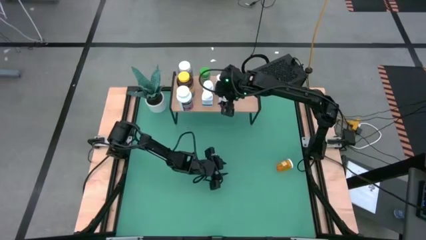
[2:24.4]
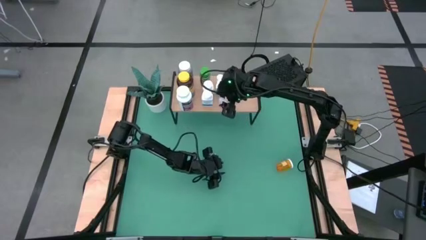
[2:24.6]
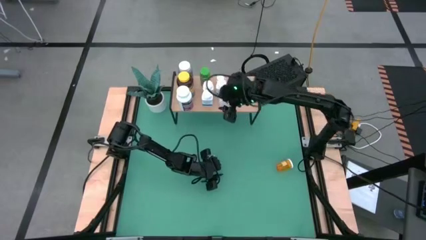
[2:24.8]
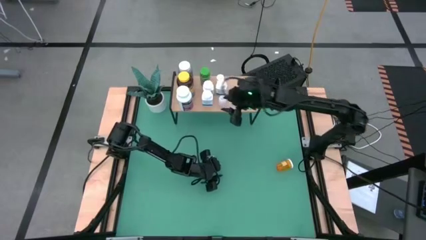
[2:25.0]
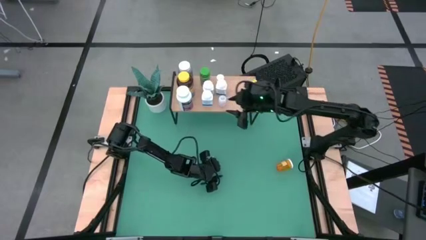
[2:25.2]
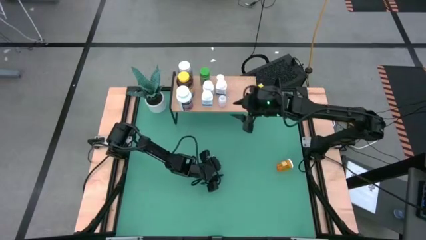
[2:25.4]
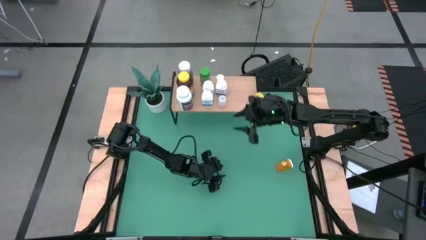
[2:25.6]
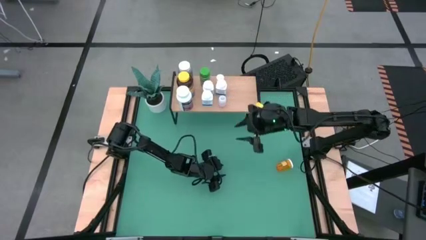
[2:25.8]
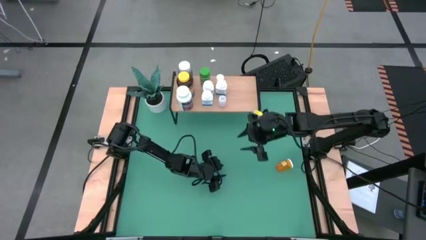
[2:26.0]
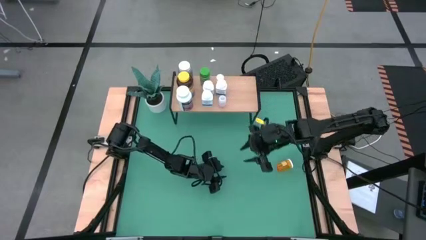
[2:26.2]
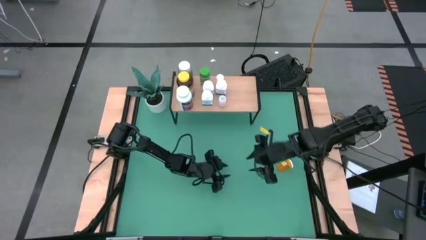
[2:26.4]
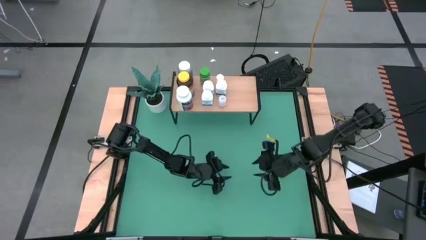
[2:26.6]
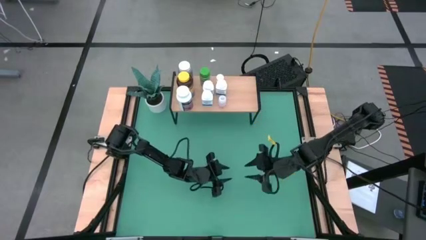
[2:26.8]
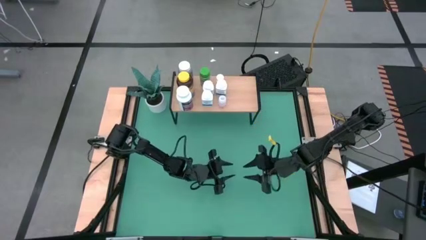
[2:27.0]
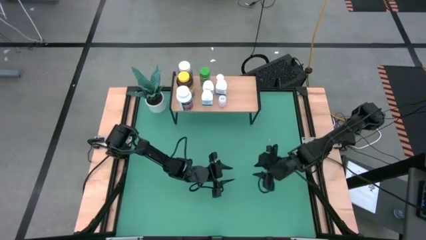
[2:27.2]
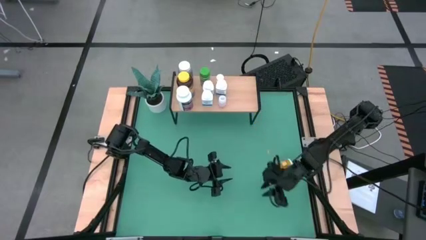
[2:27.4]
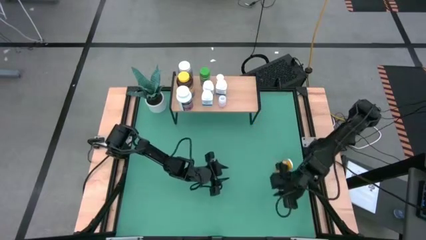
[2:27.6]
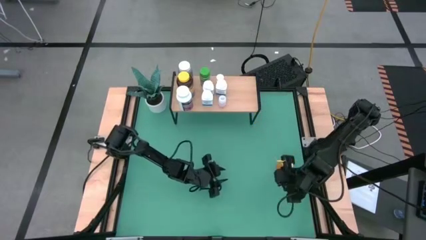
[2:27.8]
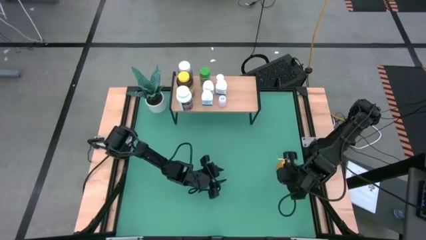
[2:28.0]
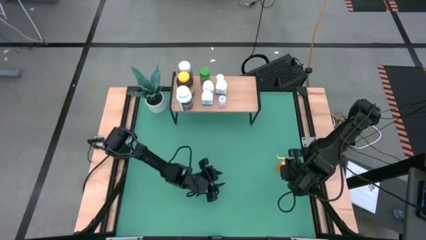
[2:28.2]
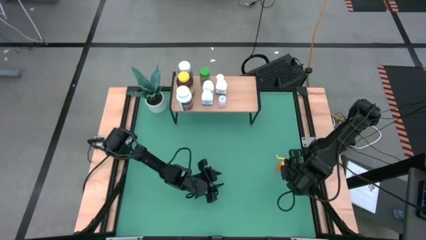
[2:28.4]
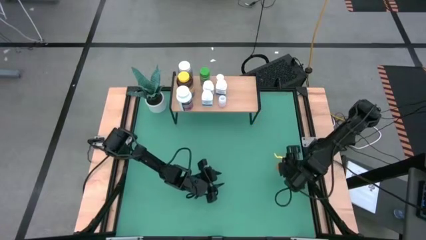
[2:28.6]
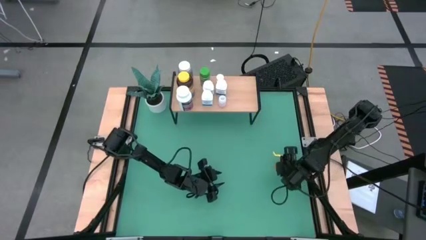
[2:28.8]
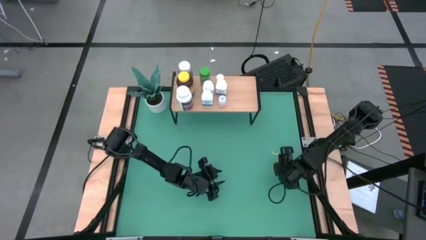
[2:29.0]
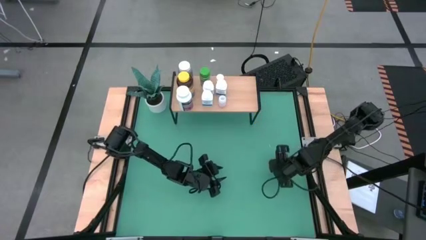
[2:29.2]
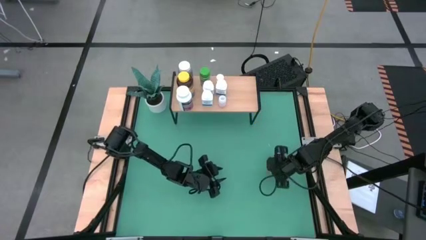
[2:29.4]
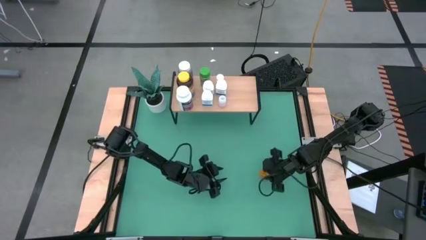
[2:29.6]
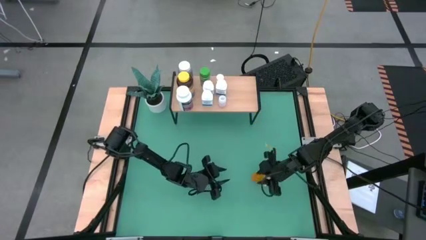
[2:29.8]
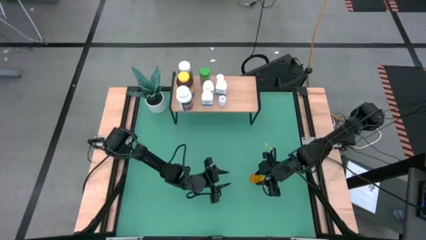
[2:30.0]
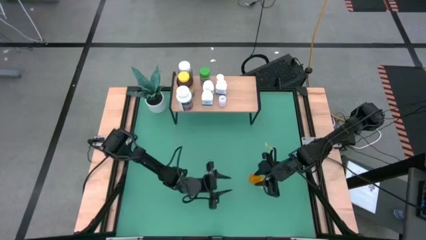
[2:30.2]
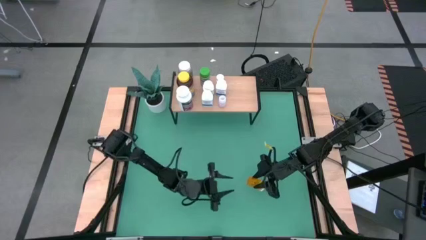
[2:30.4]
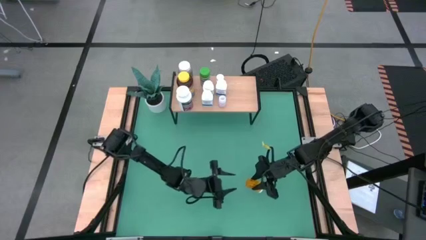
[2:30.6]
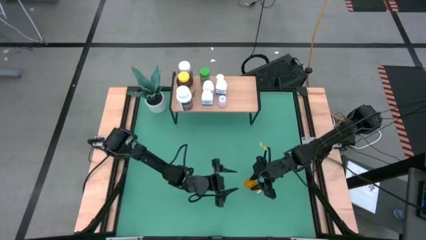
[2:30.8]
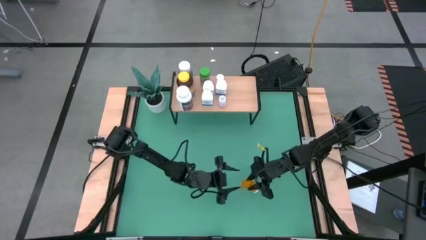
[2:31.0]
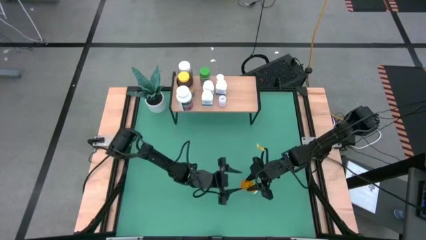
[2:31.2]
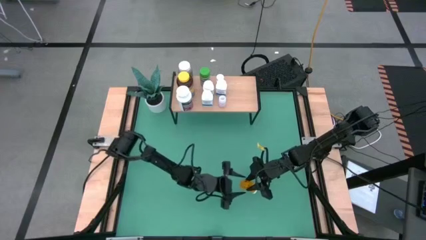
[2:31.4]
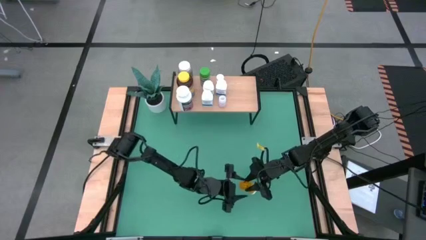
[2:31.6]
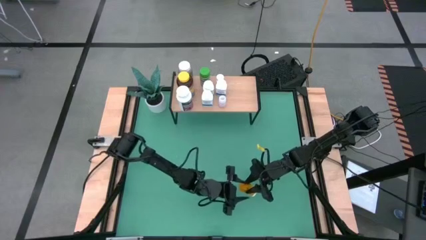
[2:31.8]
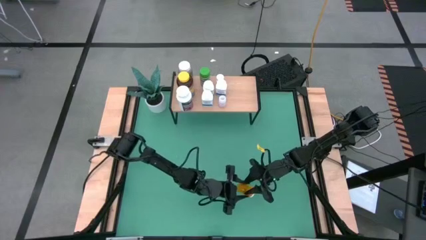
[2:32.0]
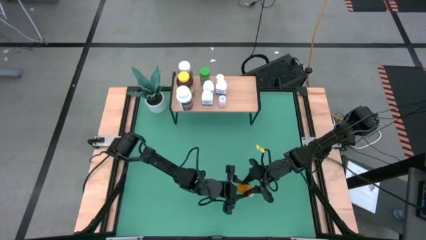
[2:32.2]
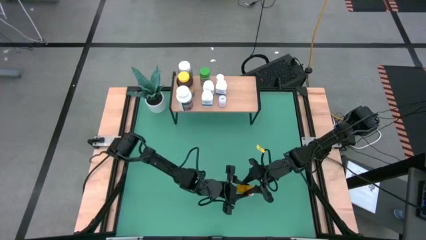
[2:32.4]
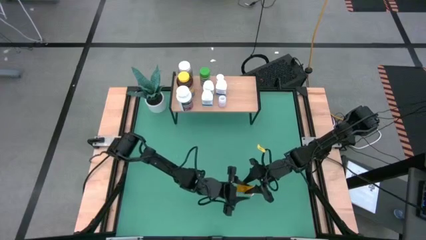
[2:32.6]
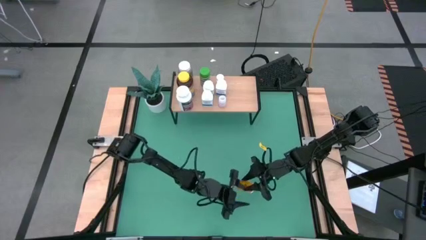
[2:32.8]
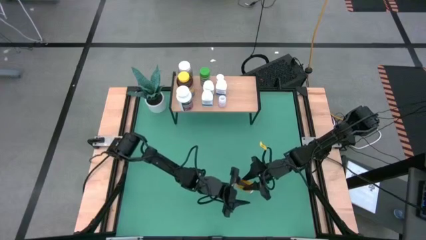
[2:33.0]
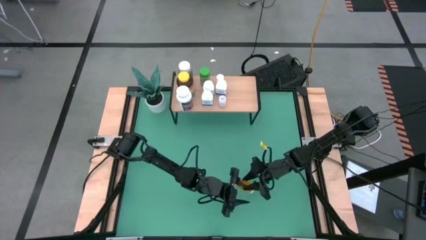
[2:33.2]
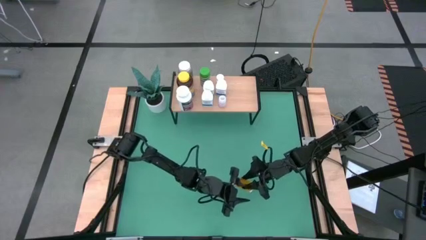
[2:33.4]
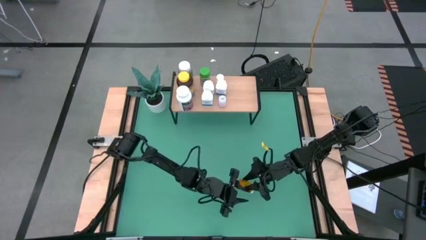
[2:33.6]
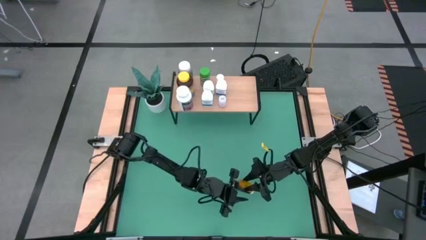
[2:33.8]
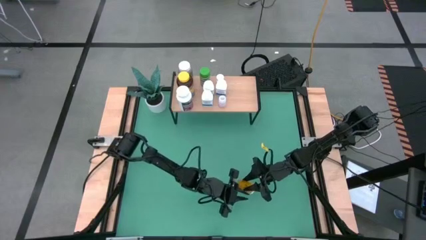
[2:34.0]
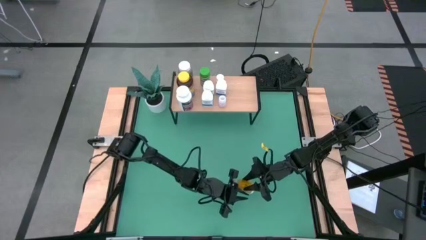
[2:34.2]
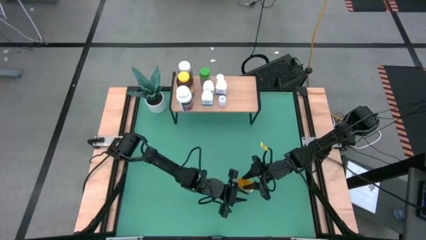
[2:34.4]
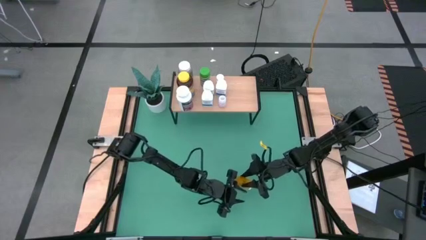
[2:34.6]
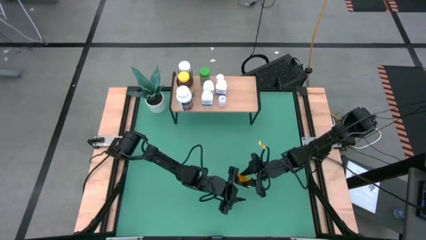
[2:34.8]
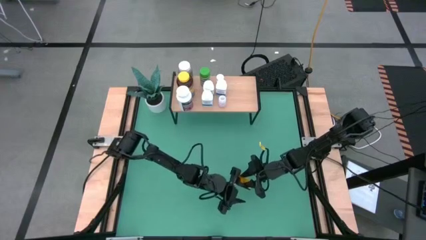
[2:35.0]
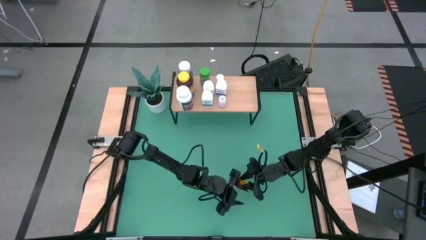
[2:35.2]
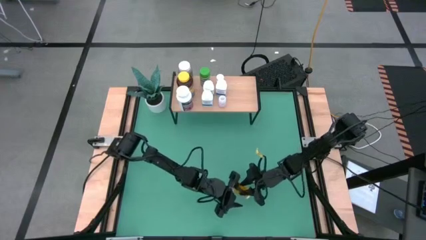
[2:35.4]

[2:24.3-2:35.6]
Task: Pick and place medicine bottles onto shelf by color
Put the orange pill bottle on the shelf
